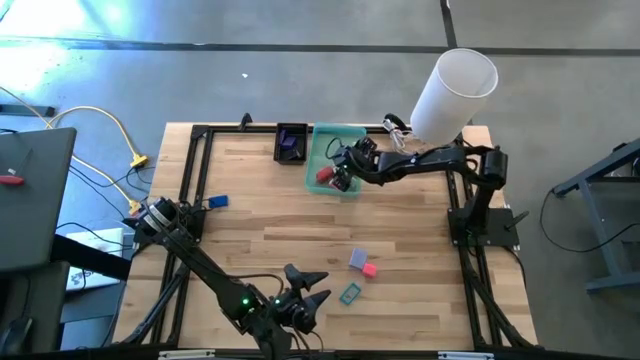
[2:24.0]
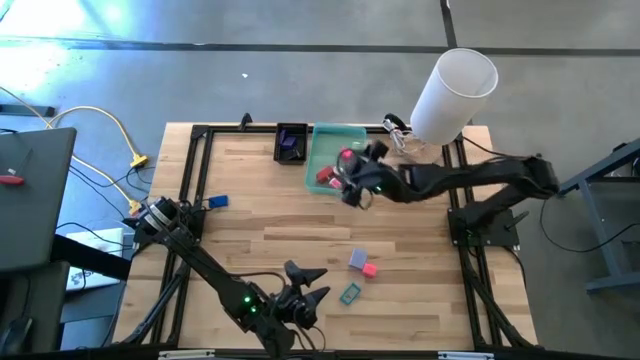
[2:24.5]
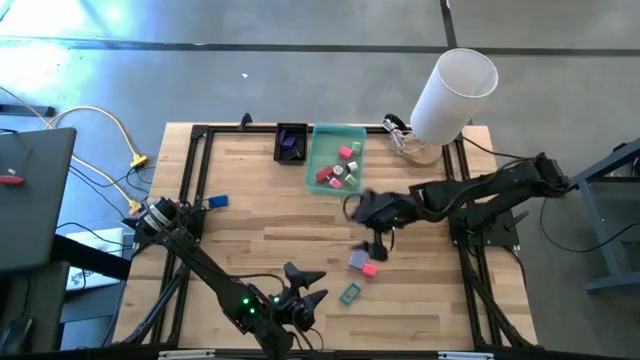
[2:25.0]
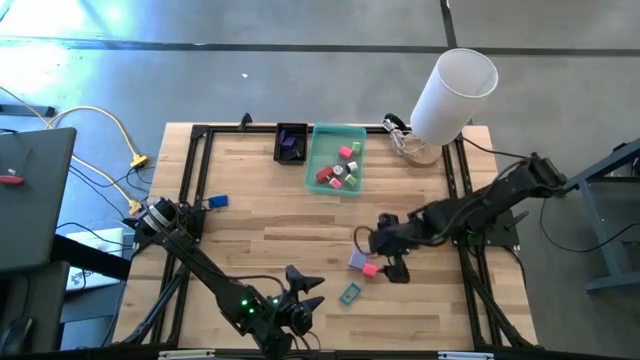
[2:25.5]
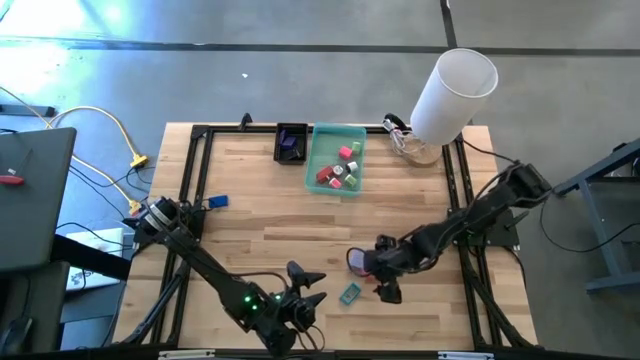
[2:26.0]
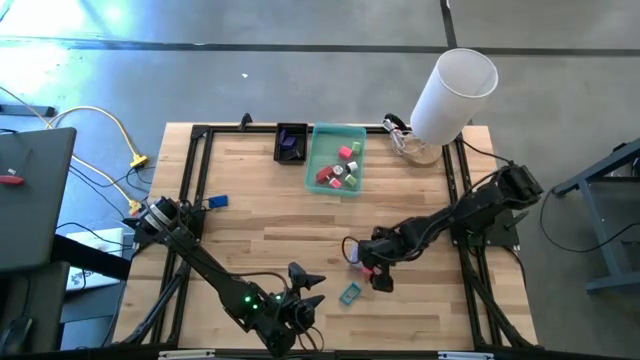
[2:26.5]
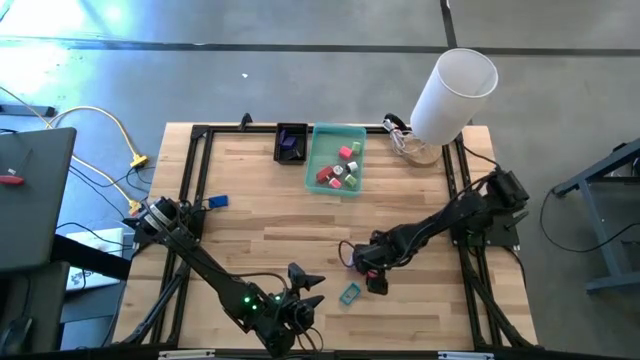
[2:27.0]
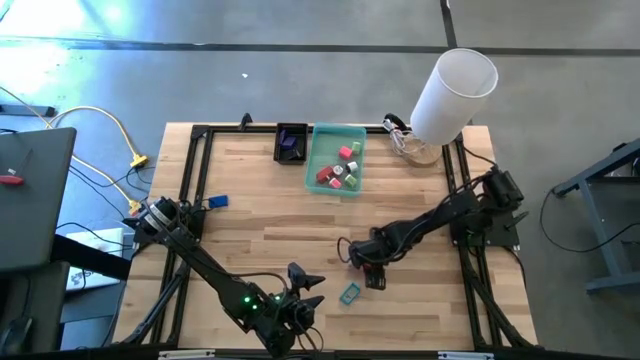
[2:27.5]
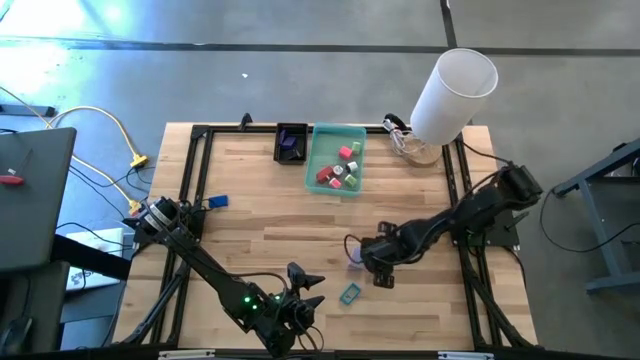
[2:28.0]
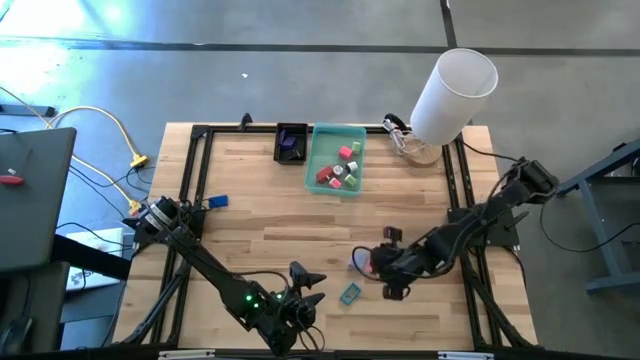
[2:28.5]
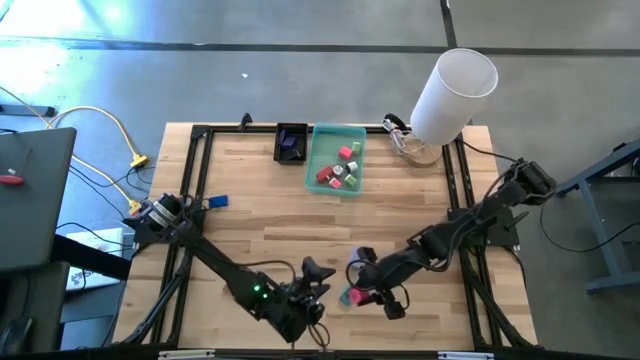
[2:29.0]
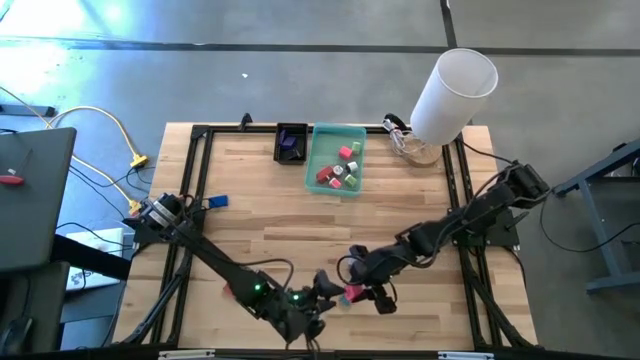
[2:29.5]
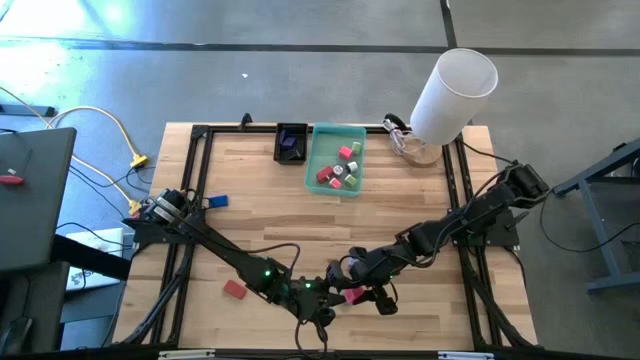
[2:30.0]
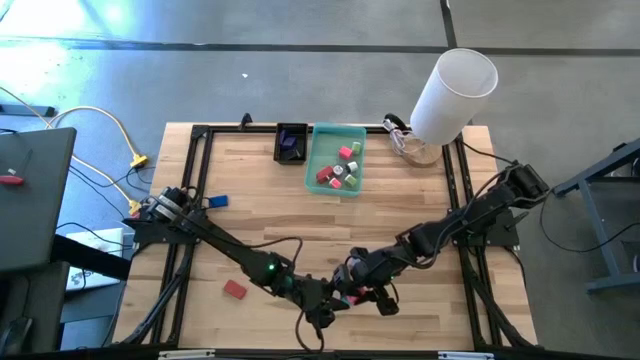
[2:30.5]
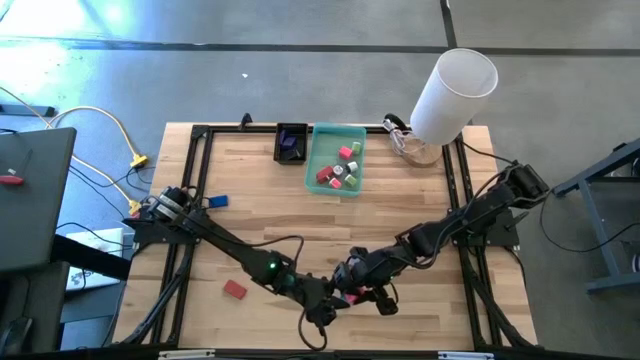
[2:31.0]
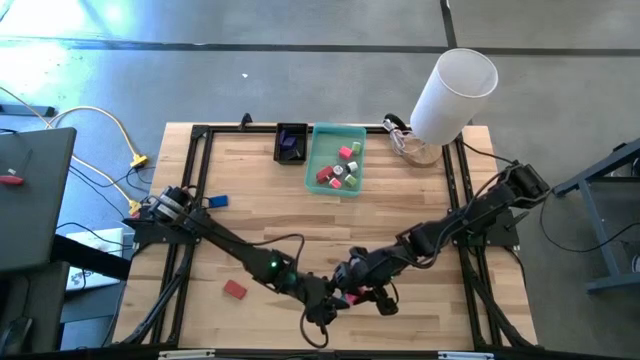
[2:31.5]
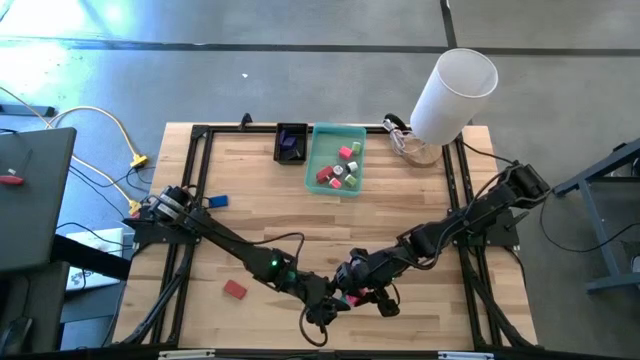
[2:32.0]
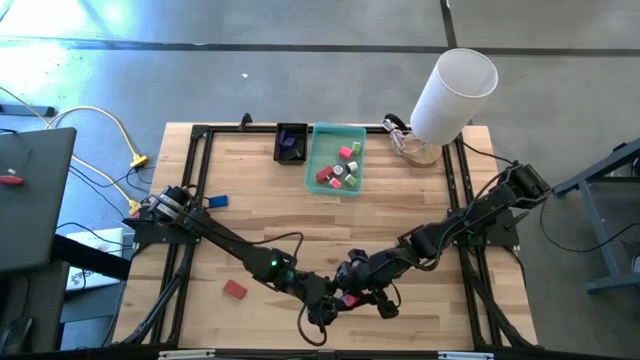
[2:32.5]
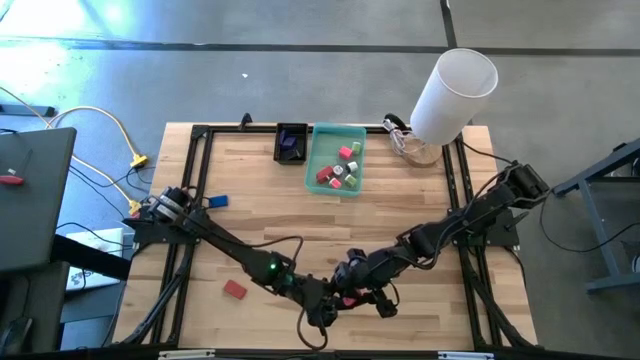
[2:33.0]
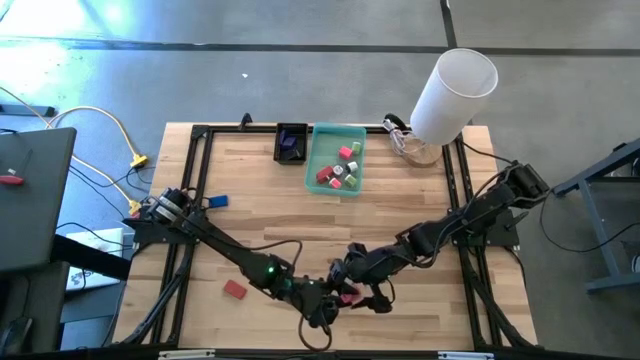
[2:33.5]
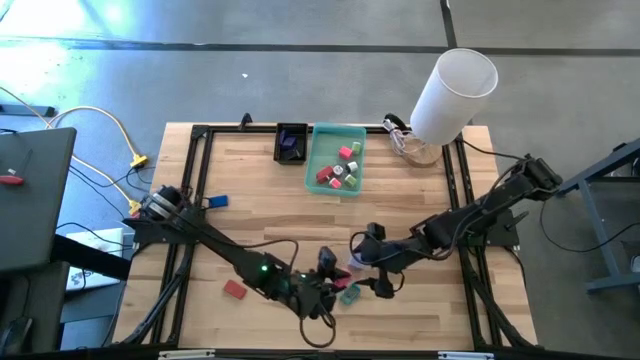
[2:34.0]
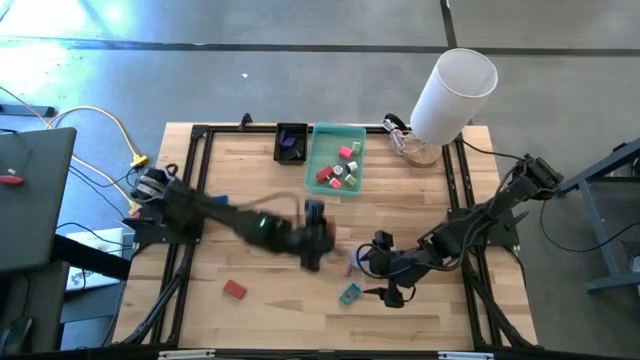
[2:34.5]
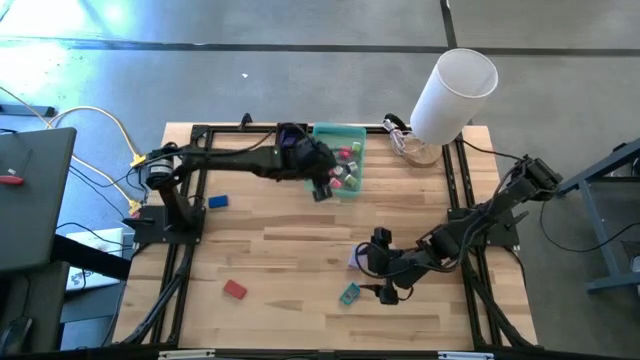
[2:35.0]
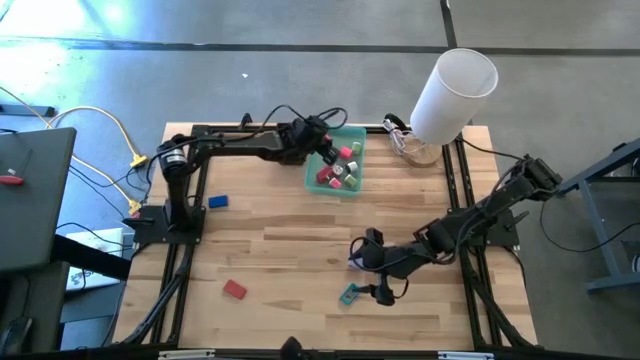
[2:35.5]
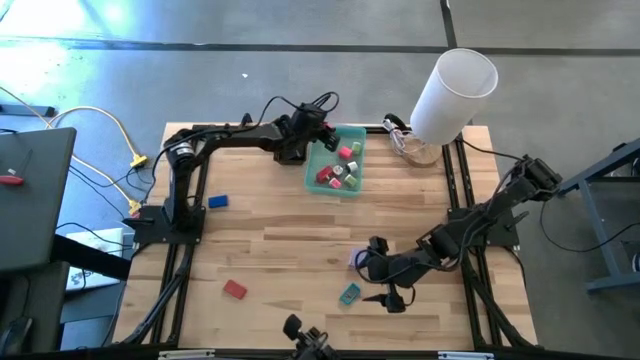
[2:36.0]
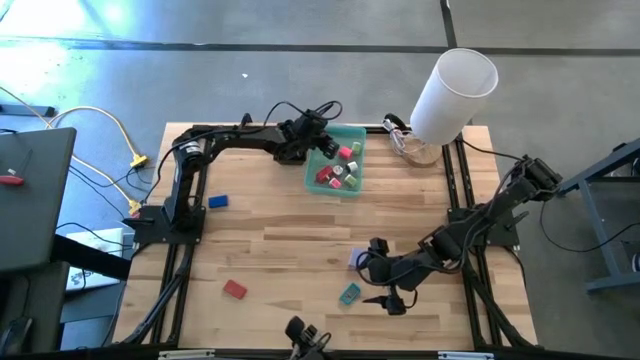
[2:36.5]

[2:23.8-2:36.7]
Task: Pick & Place Office items
Put the pink charger adapter into the green bin

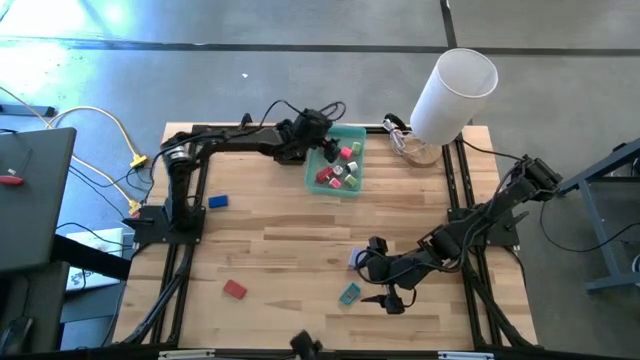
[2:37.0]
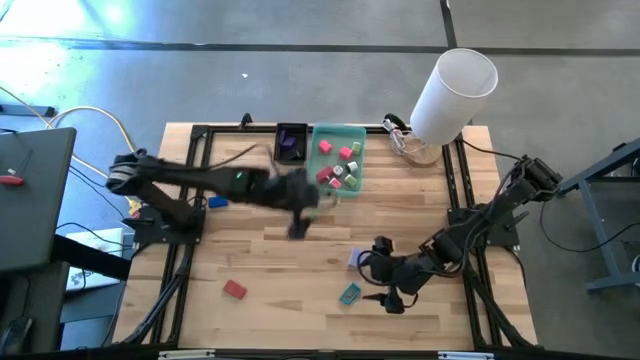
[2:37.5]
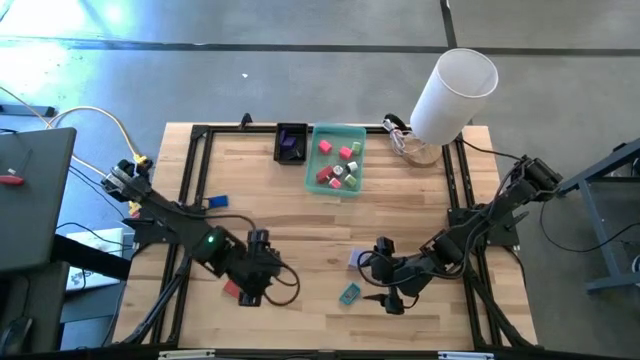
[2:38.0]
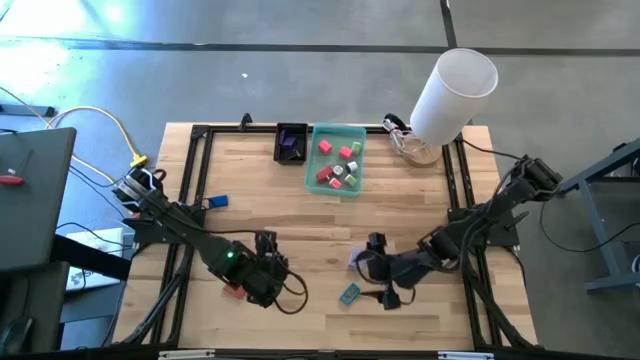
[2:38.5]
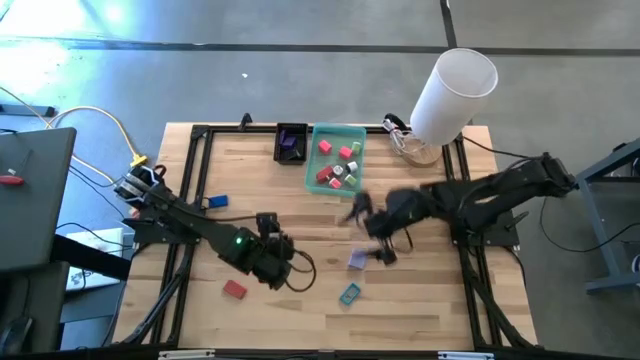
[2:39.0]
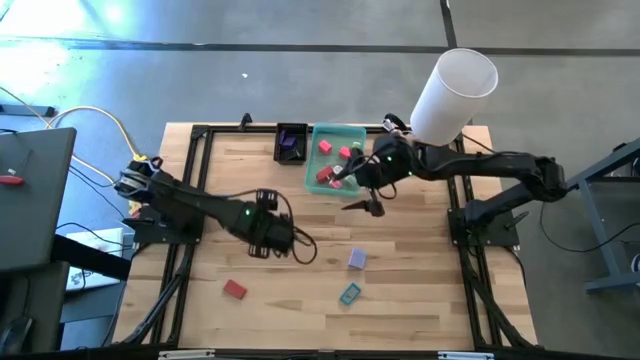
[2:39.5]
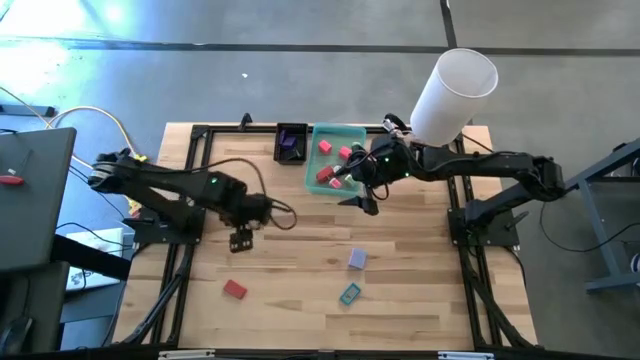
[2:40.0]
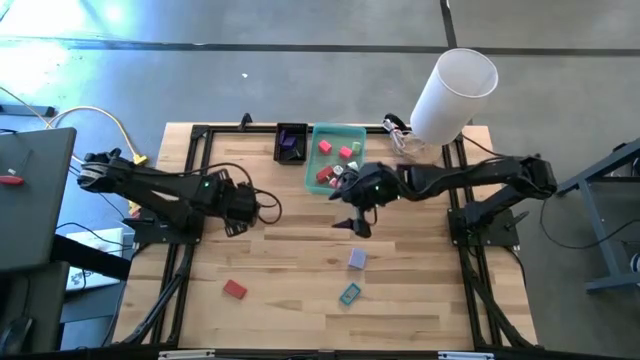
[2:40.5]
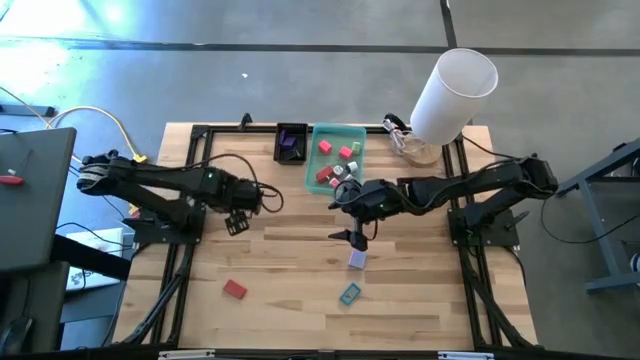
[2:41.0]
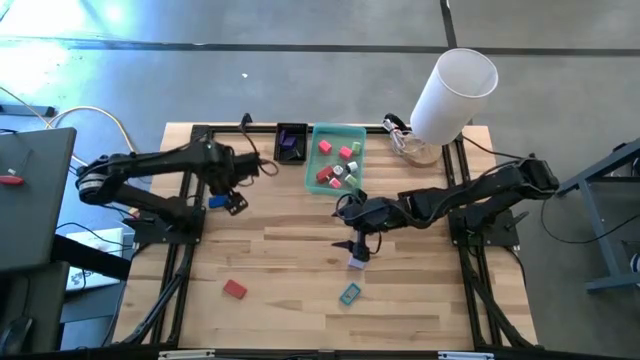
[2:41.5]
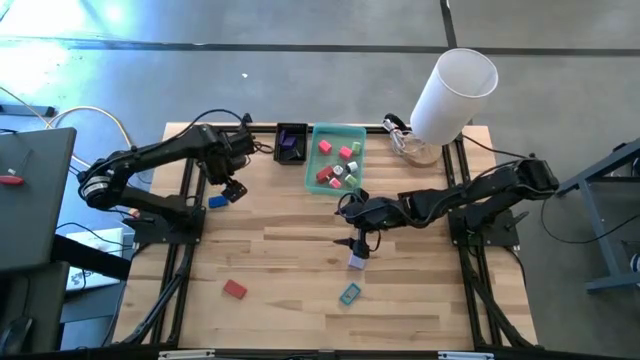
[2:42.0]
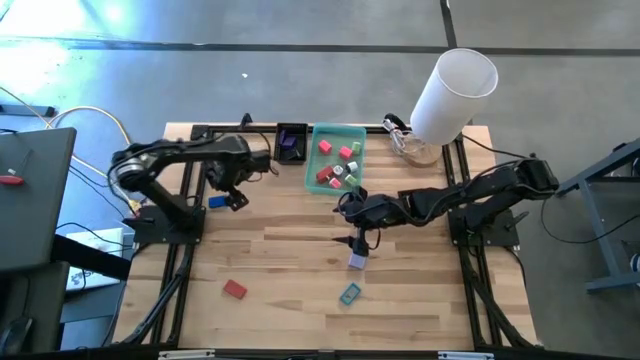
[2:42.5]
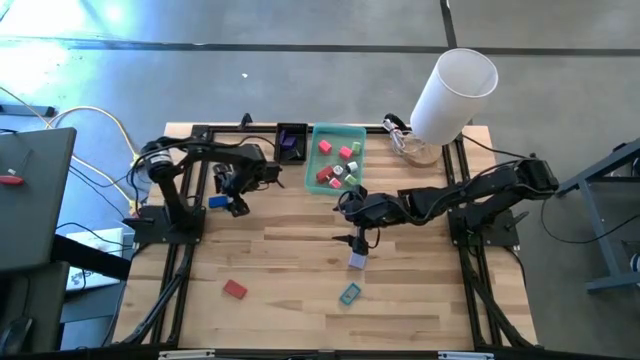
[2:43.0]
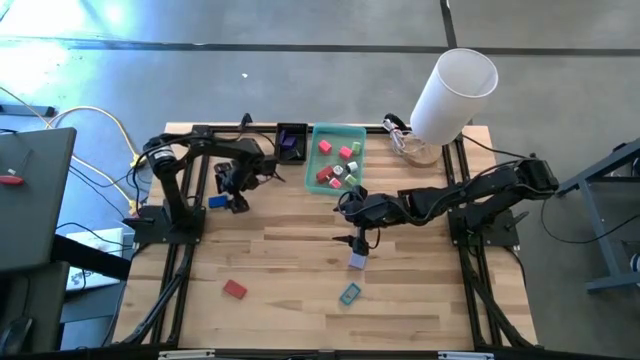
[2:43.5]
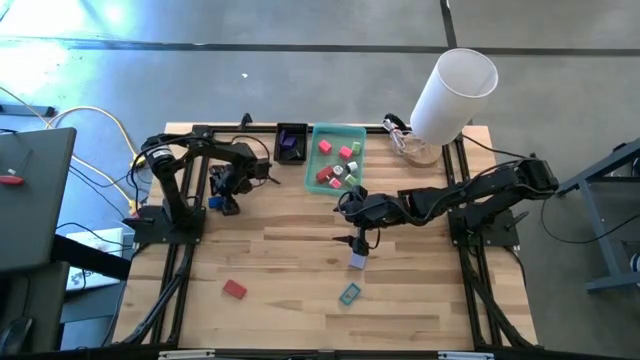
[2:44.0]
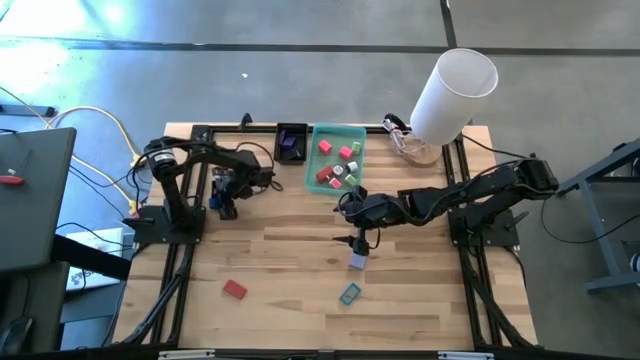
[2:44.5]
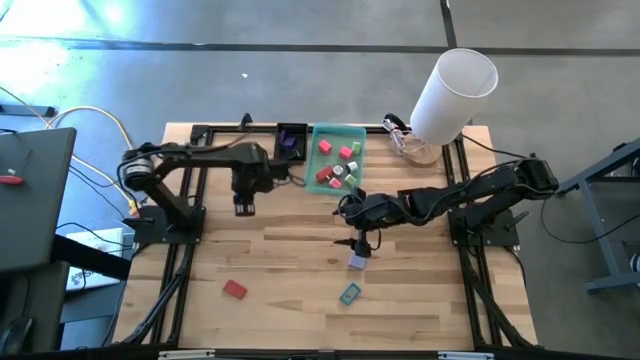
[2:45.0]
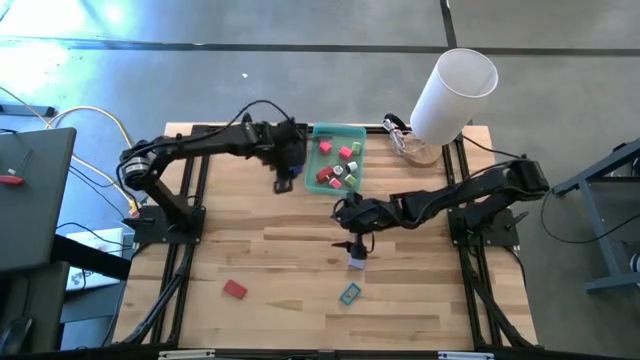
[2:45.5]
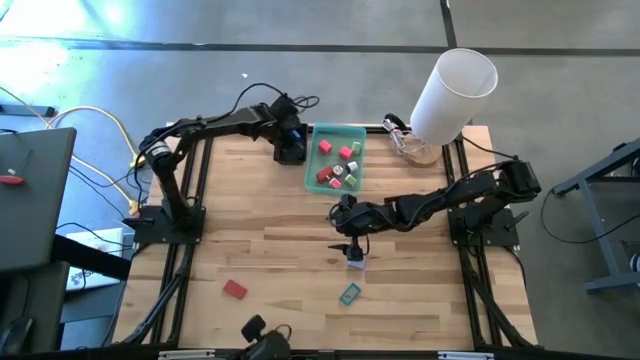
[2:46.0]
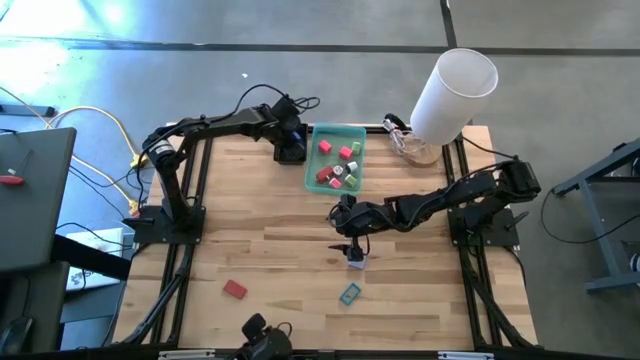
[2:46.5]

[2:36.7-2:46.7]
Put the blue digital clock into the black bin
